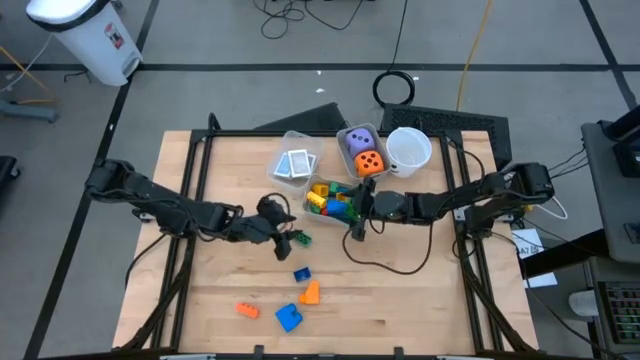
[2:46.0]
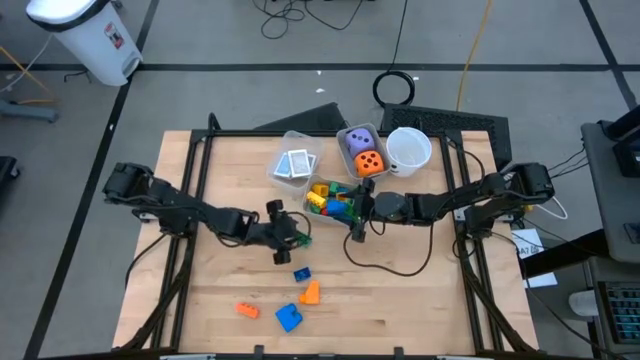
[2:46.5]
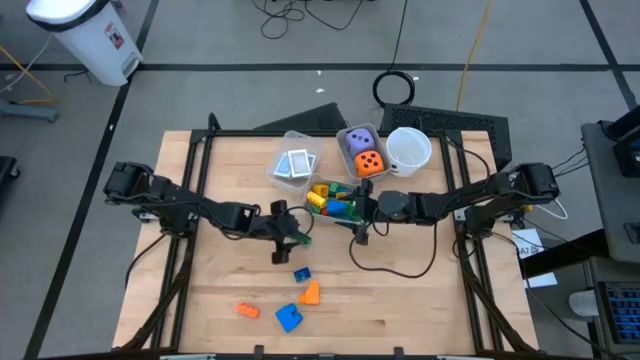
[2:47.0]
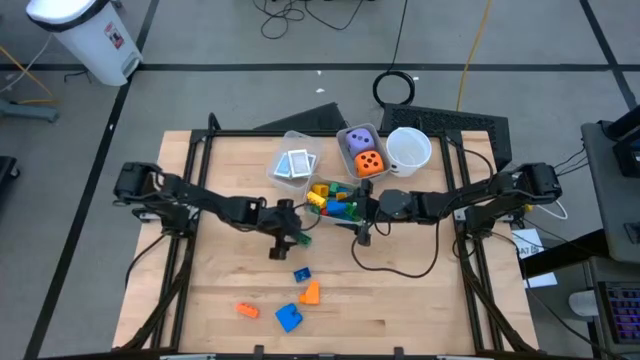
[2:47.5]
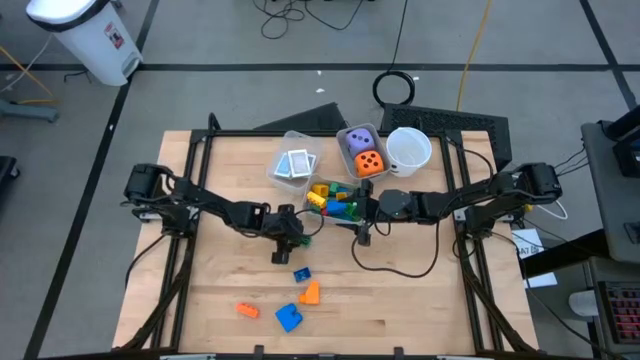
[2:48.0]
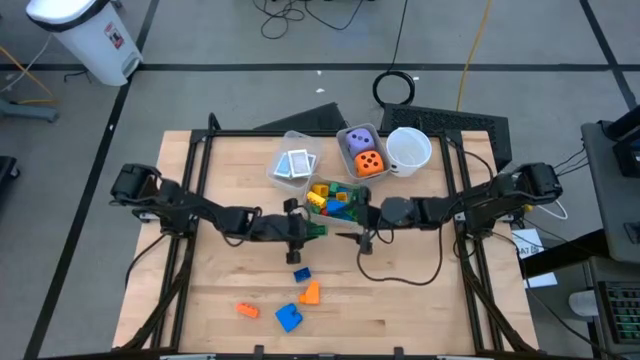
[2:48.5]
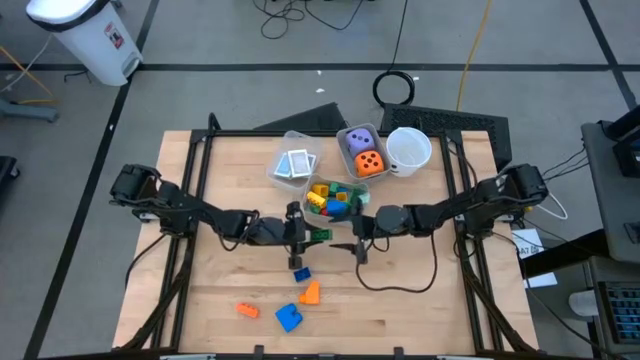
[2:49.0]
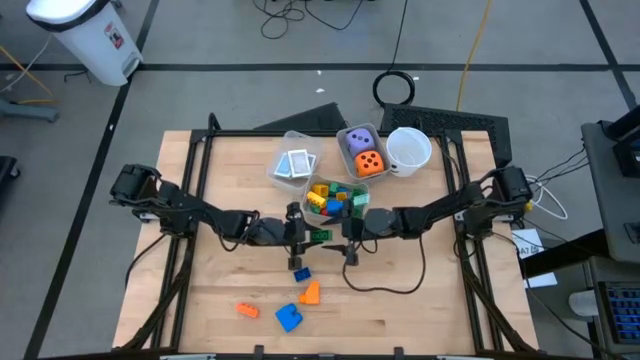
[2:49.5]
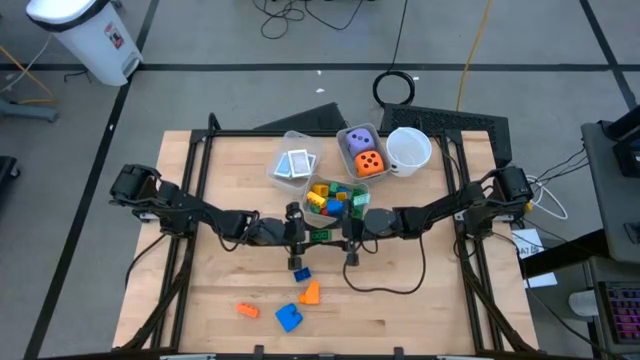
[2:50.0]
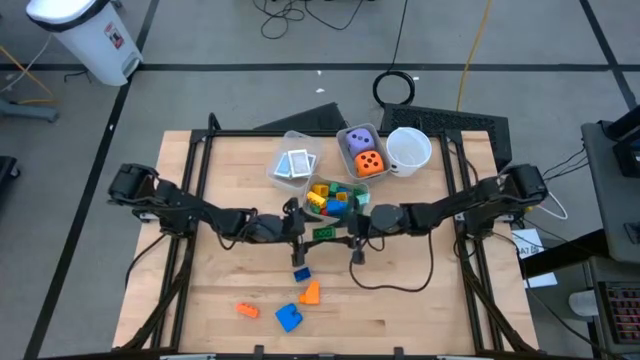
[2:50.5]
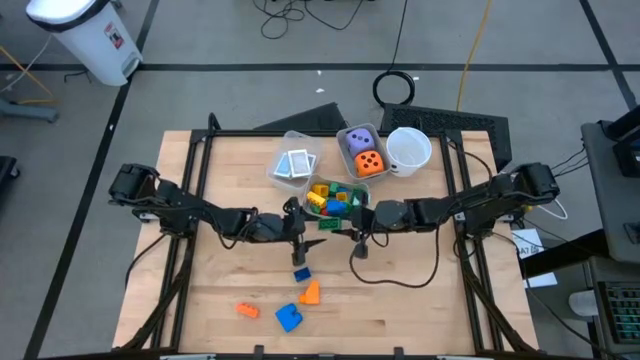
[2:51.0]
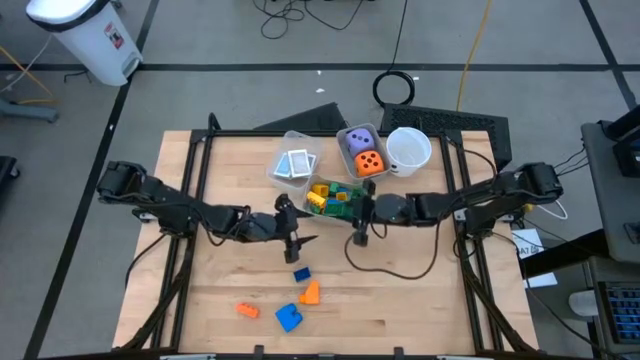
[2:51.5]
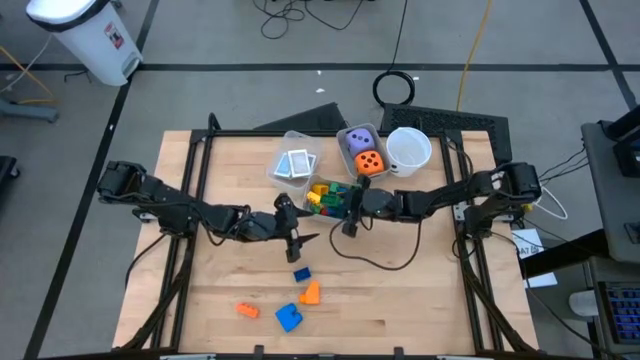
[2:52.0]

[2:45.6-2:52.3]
Task: Pick & Place Toys
Put the green game piece into the bottom gray bin

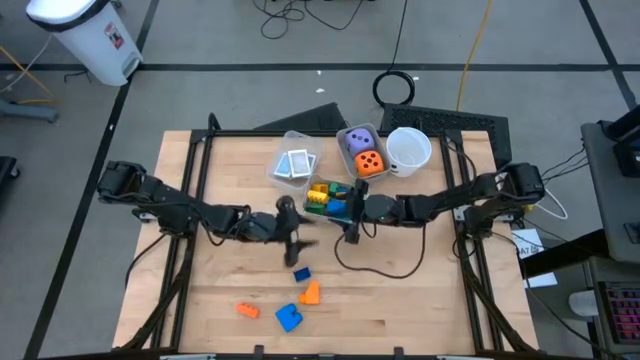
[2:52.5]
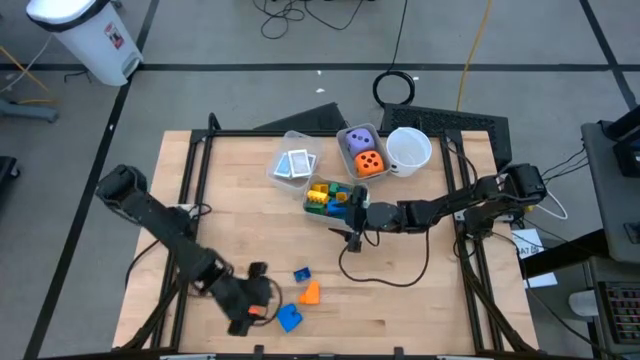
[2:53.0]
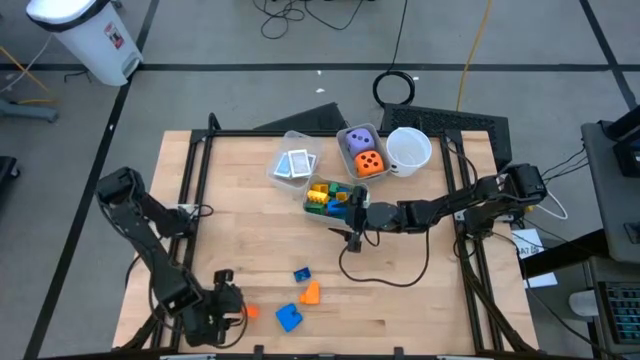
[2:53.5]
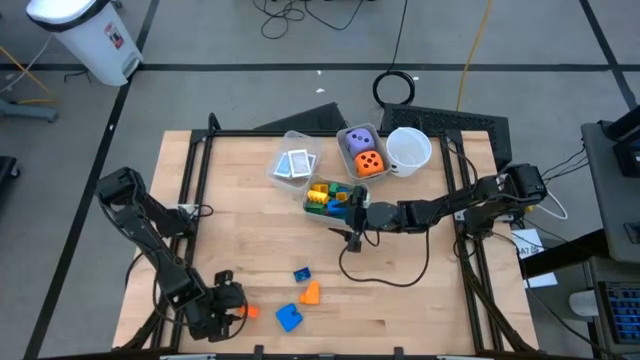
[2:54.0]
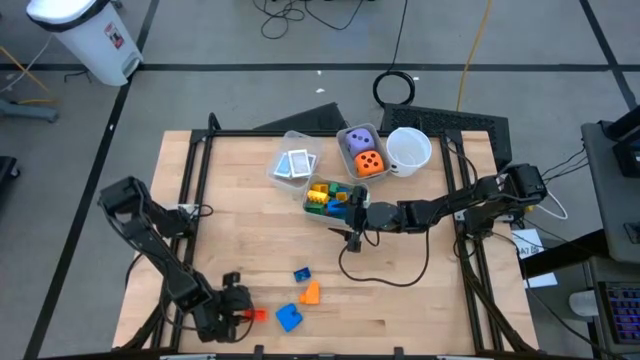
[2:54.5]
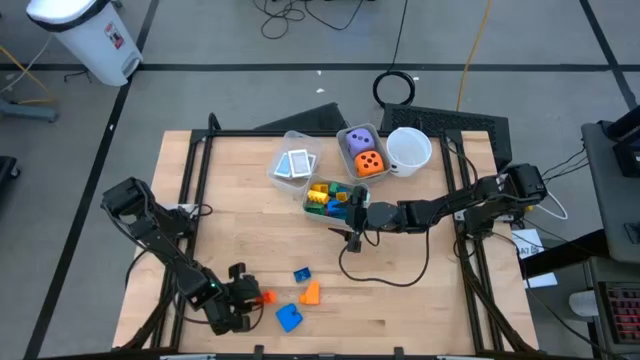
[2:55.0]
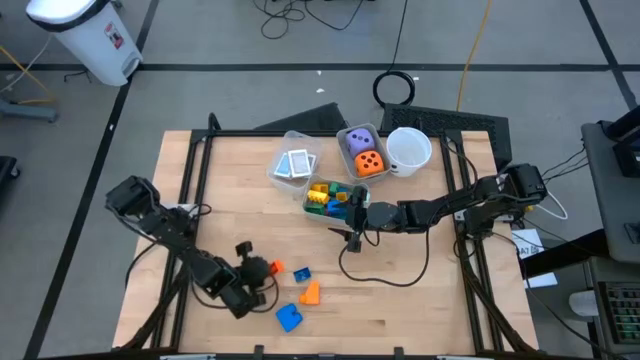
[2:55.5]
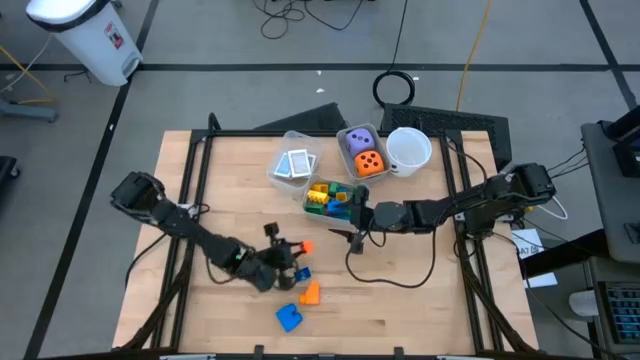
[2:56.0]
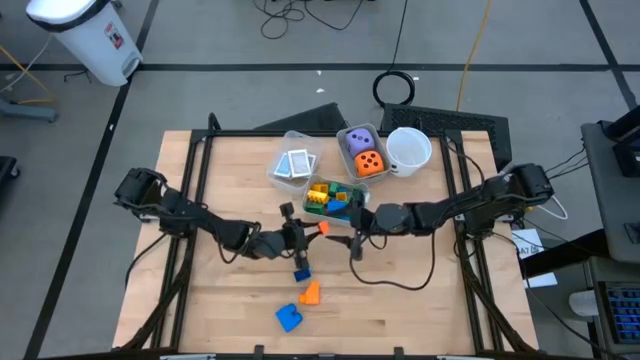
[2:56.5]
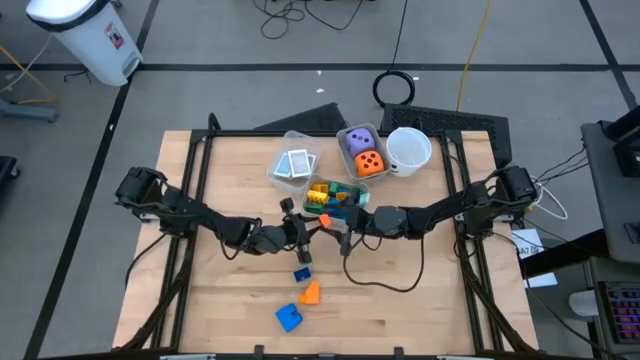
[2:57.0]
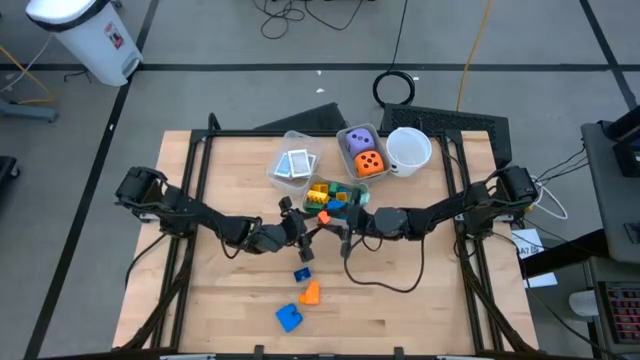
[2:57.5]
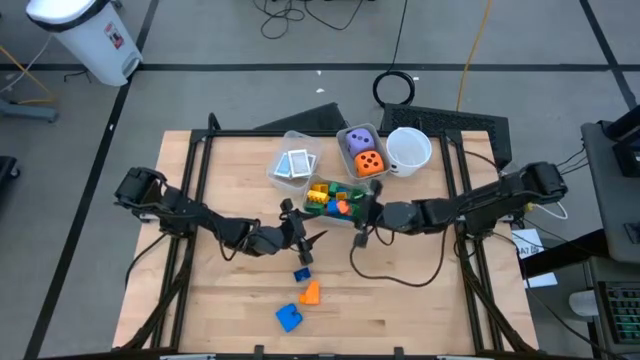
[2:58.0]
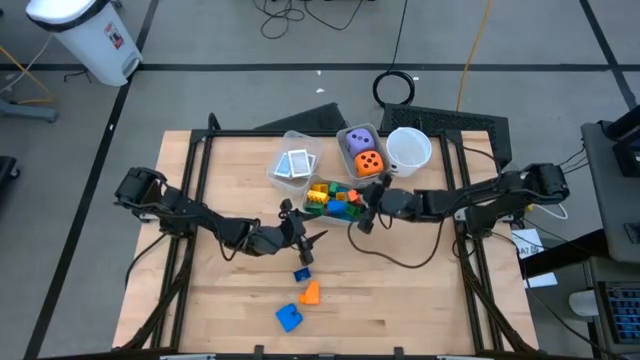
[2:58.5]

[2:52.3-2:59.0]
Put the orange game piece into the bottom gray bin

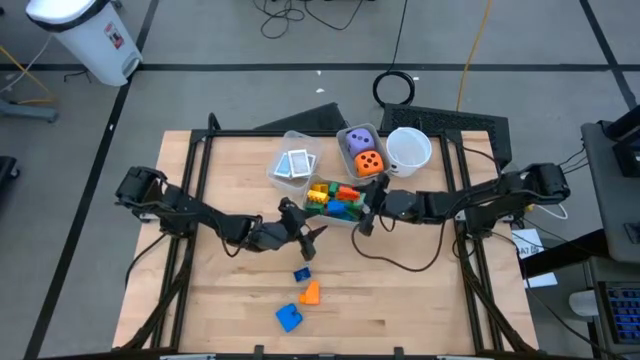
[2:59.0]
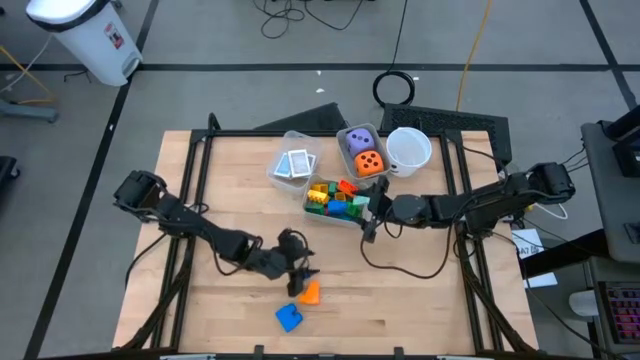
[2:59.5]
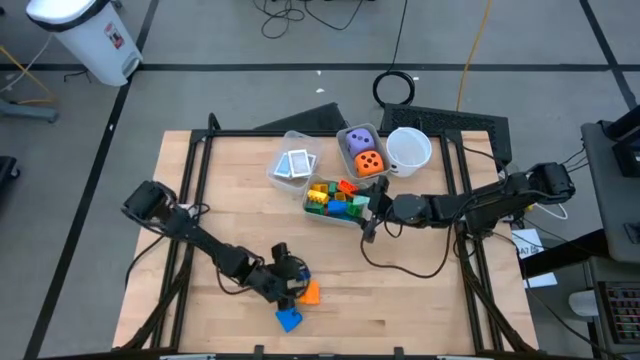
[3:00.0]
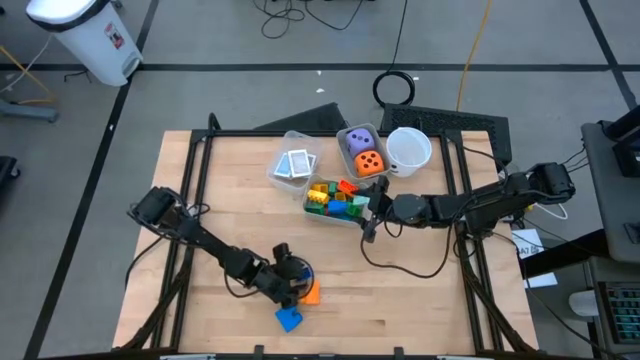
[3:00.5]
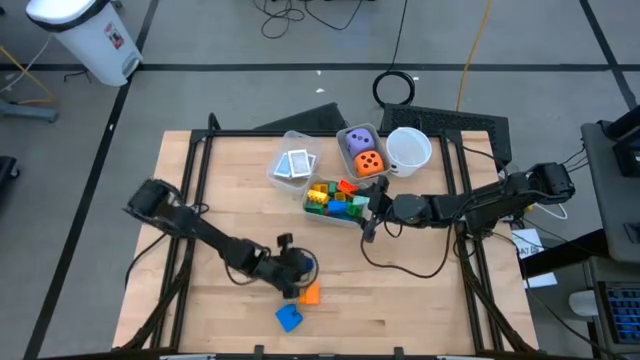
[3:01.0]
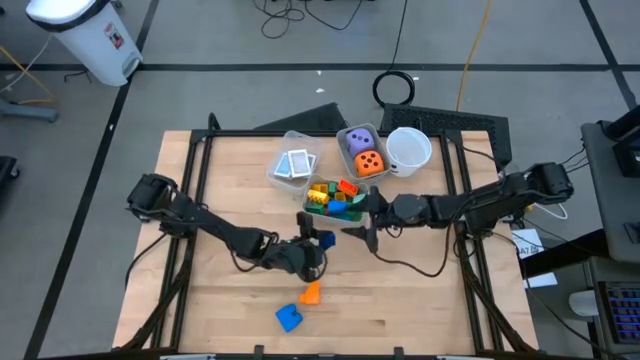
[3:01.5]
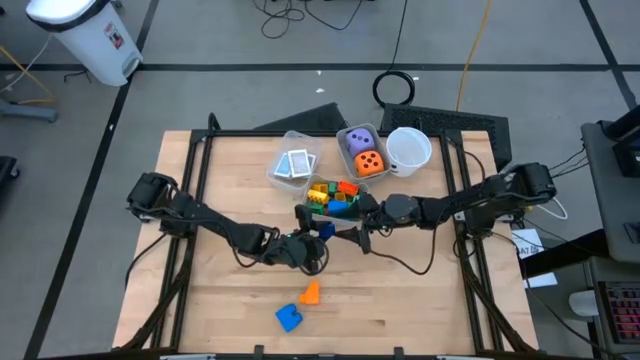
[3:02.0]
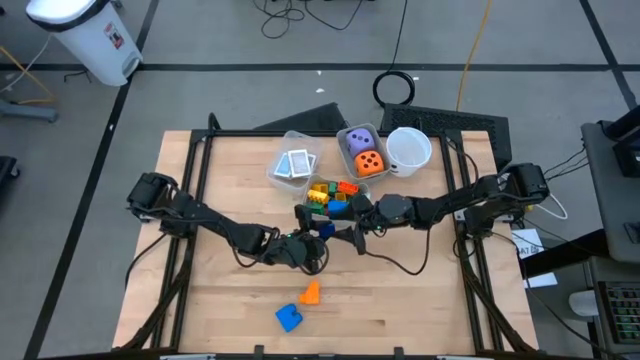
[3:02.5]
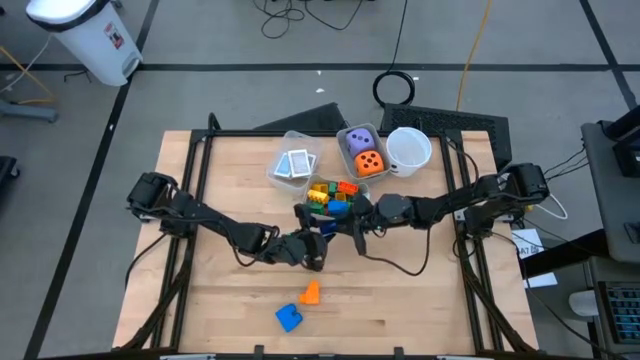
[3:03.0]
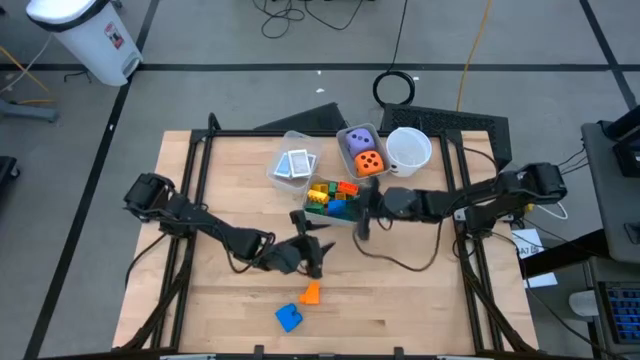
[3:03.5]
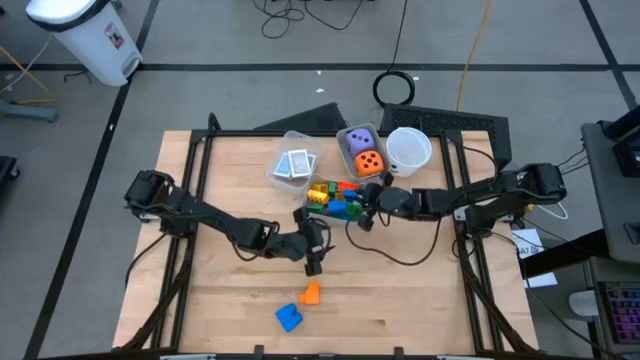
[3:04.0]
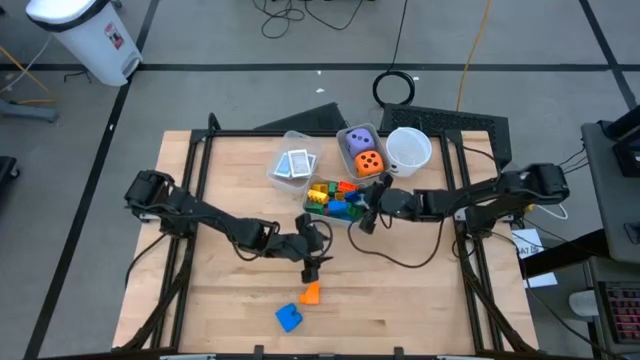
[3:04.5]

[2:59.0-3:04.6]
Put the blue game piece into the bottom gray bin

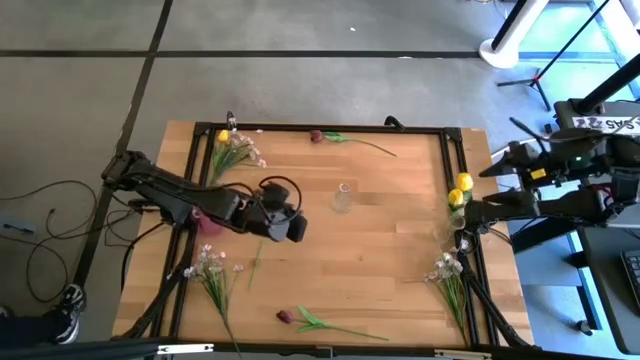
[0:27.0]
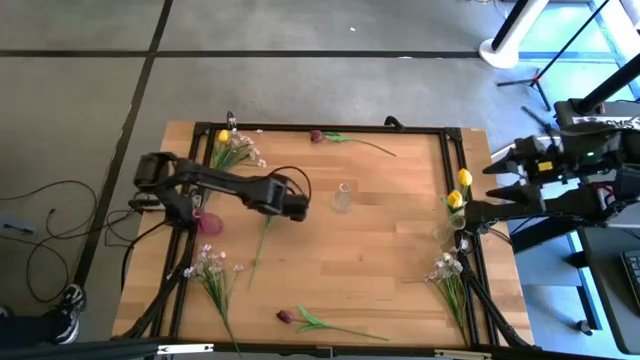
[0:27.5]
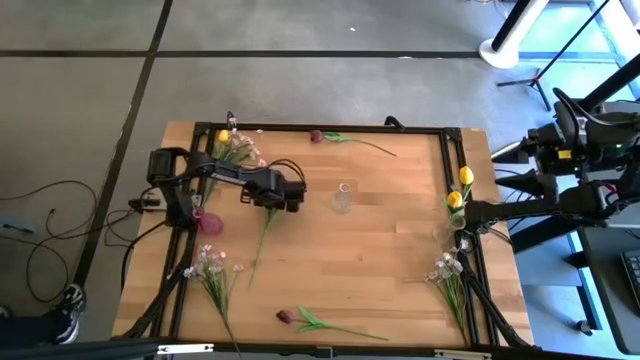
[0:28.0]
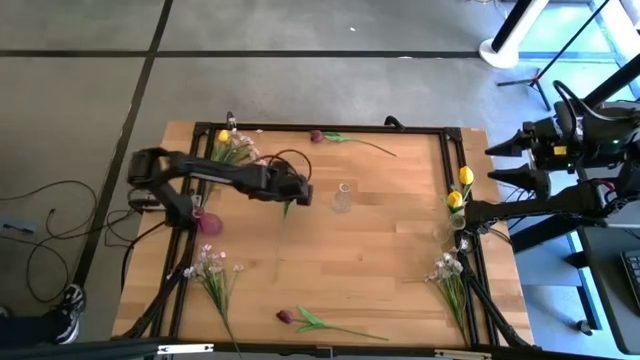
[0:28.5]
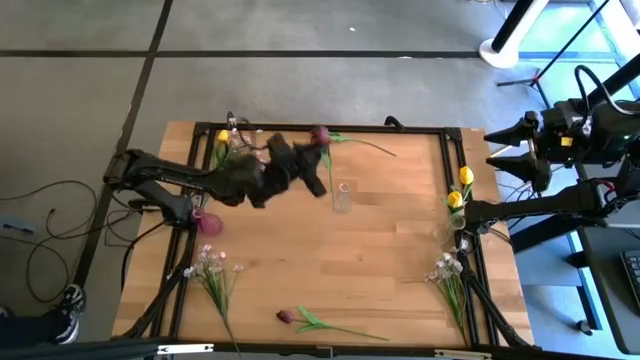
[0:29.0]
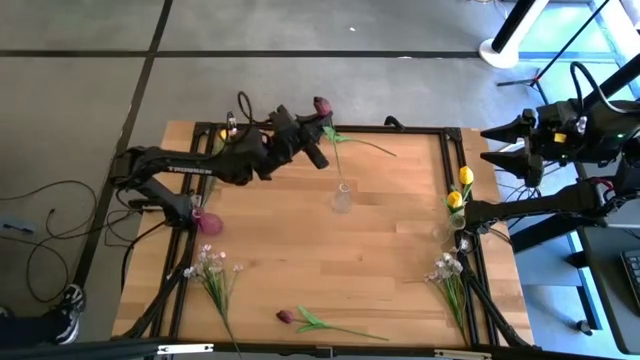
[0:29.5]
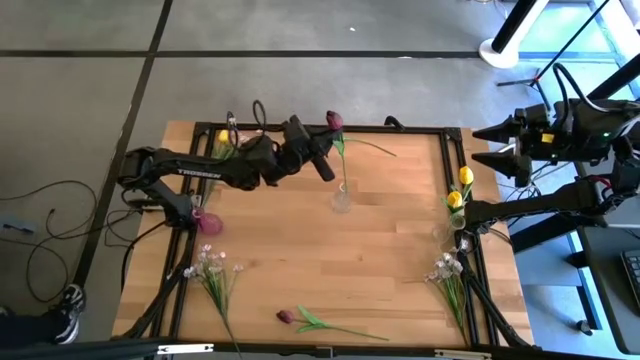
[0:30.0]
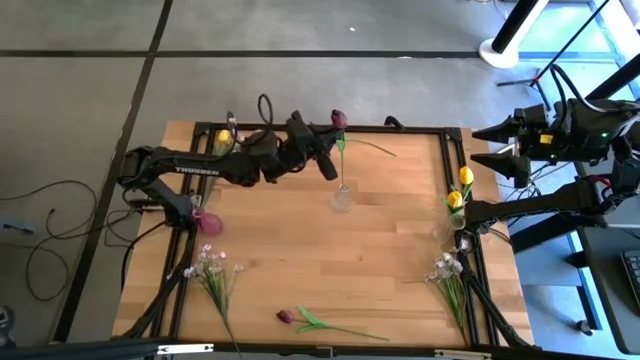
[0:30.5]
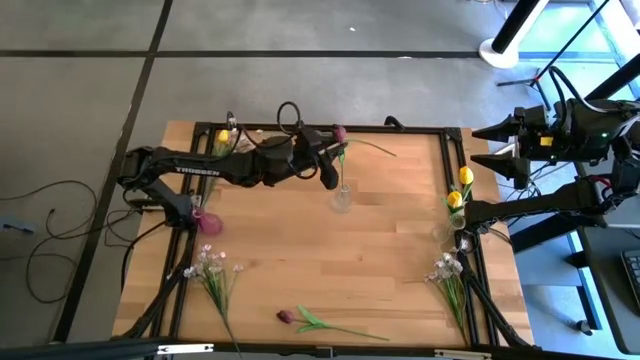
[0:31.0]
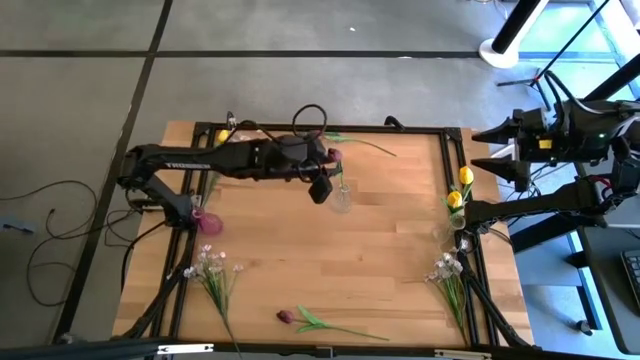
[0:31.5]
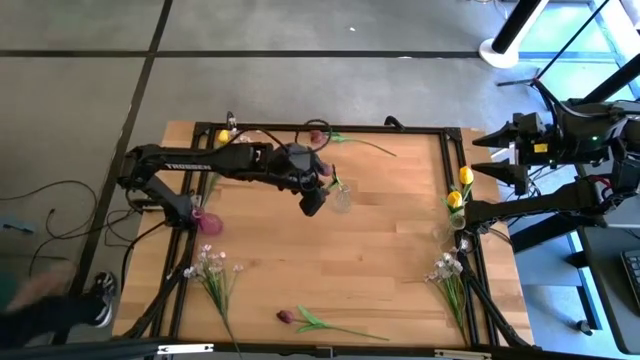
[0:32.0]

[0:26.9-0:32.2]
Task: Sort flowers into vase by color
Put the middle red tulip into the top transparent vase
